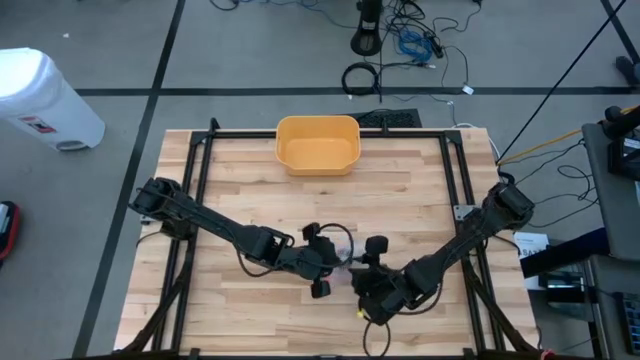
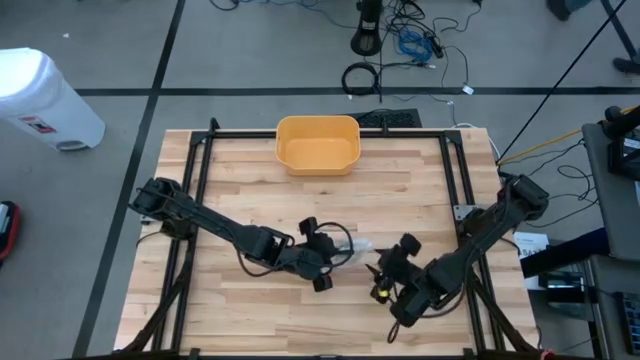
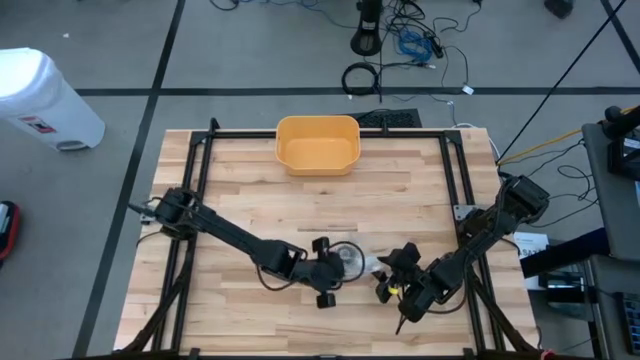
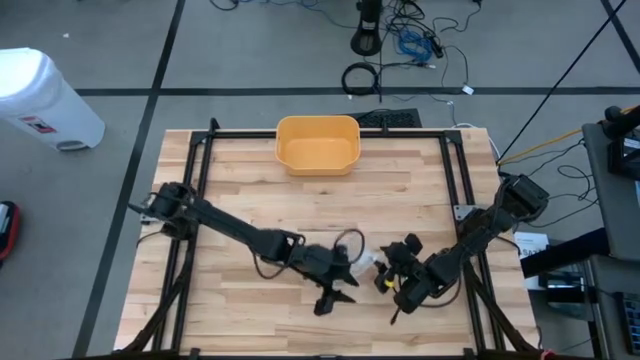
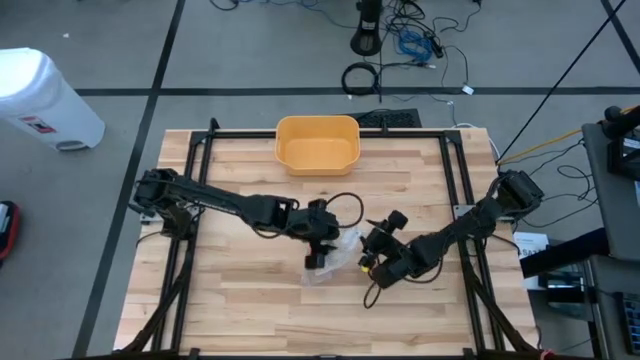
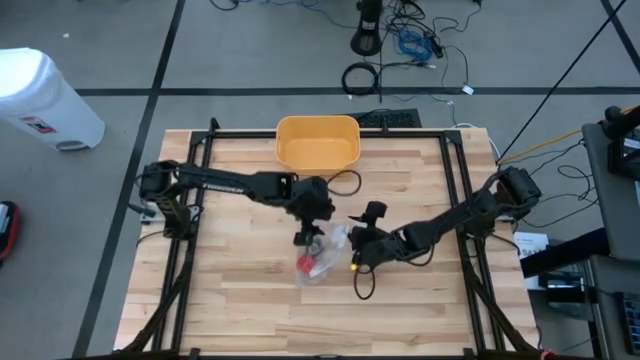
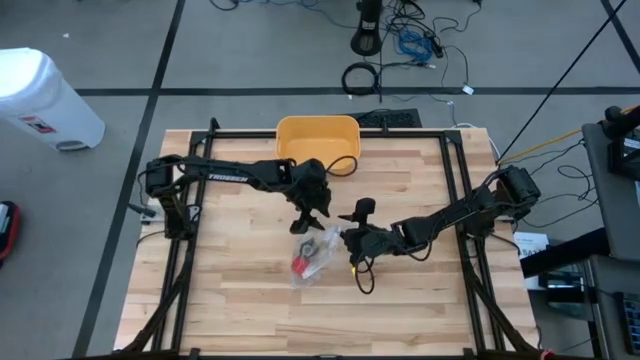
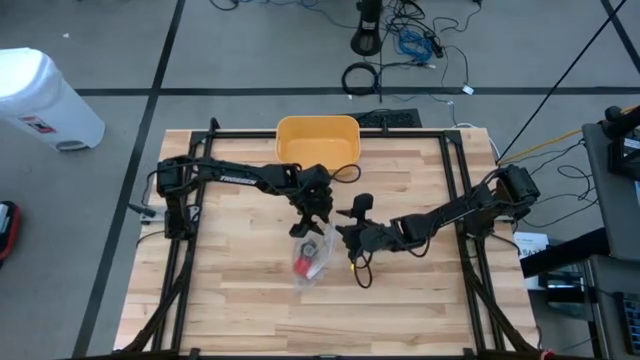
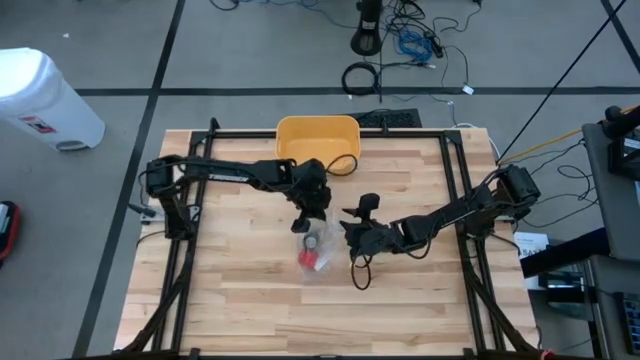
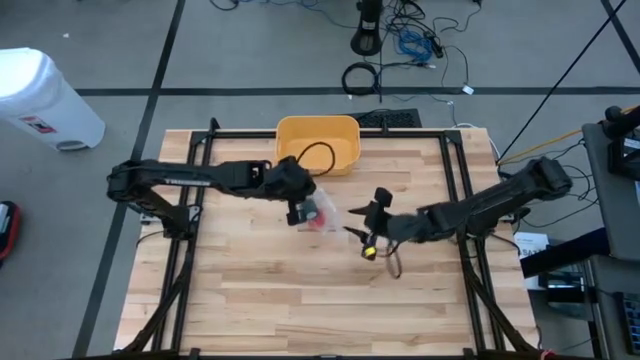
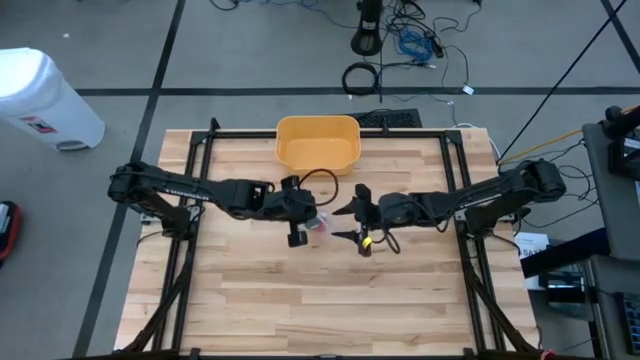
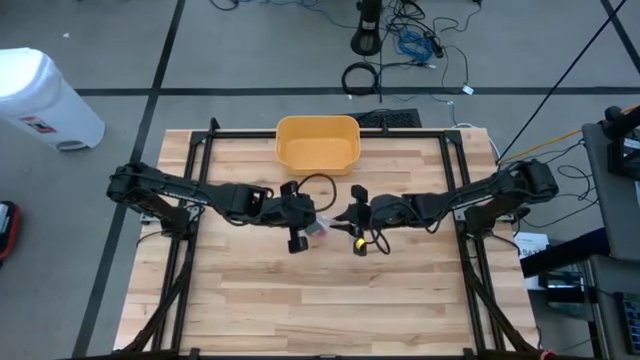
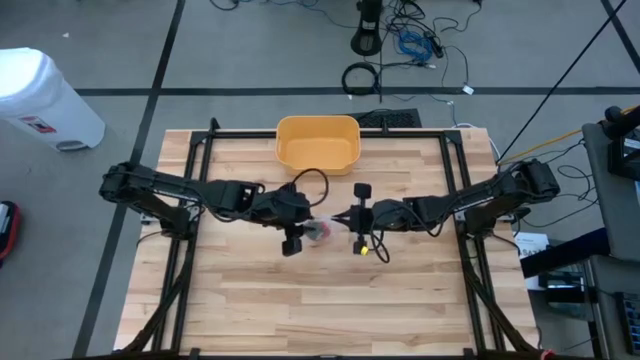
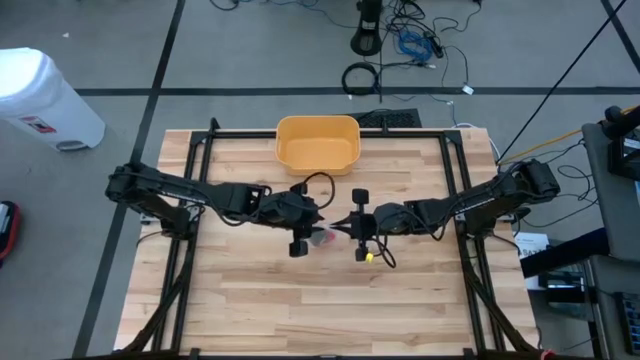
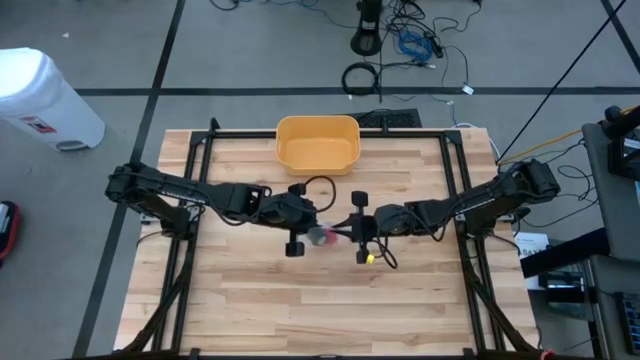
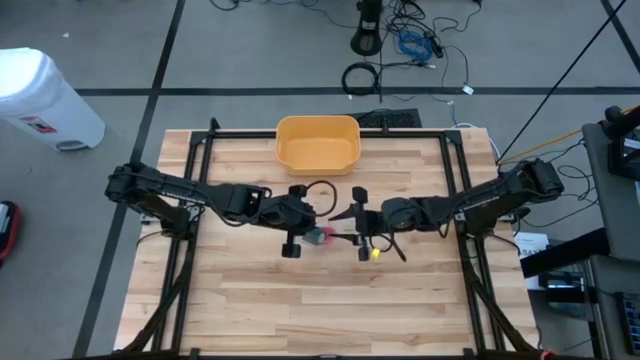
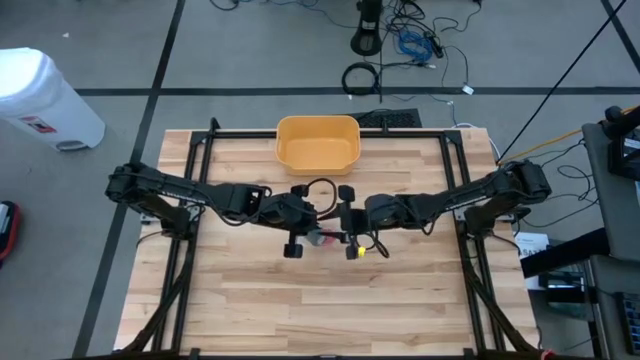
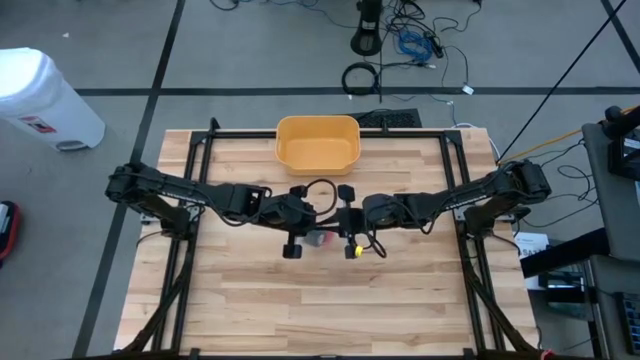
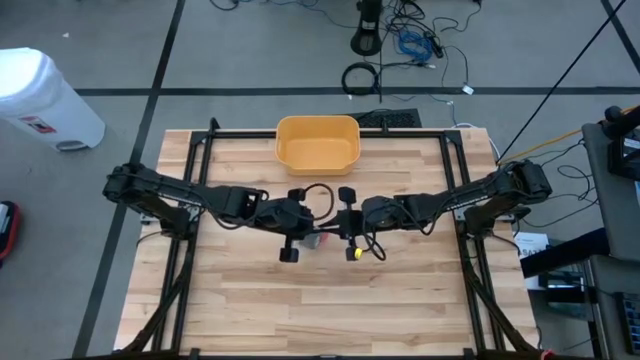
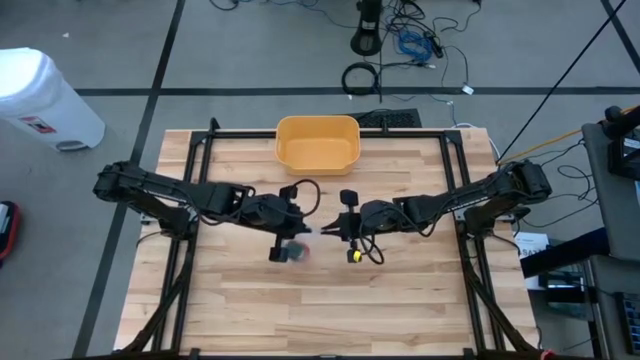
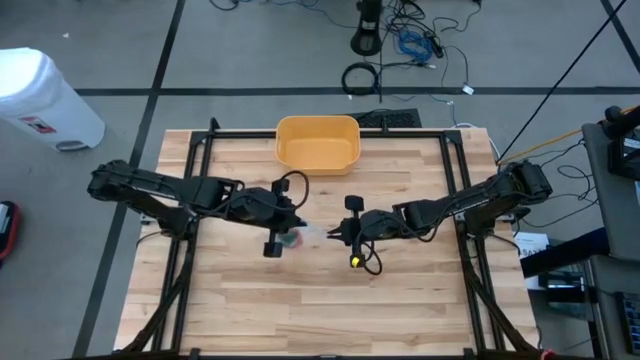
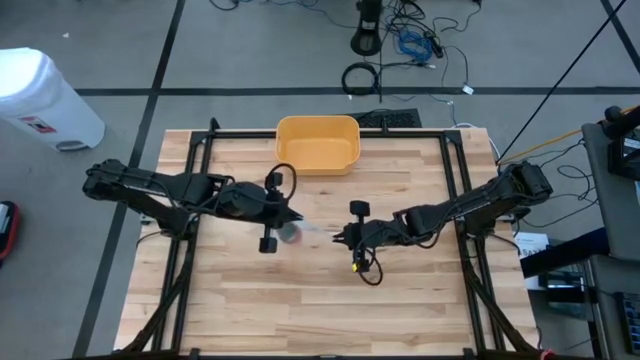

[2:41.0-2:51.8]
Task: Roll bandage
Close the transparent zip bag

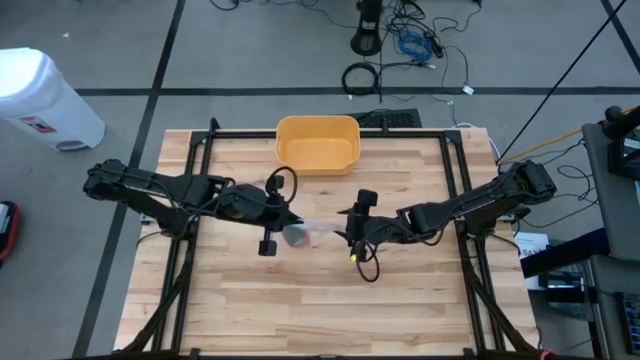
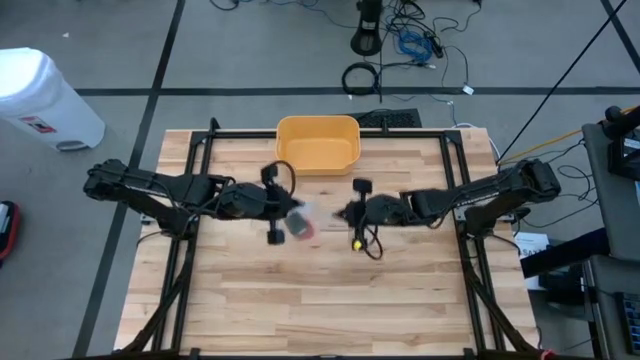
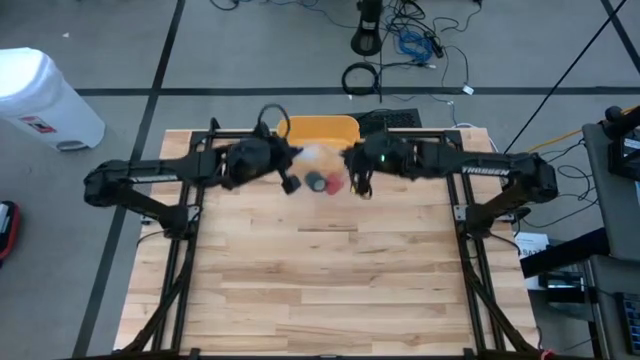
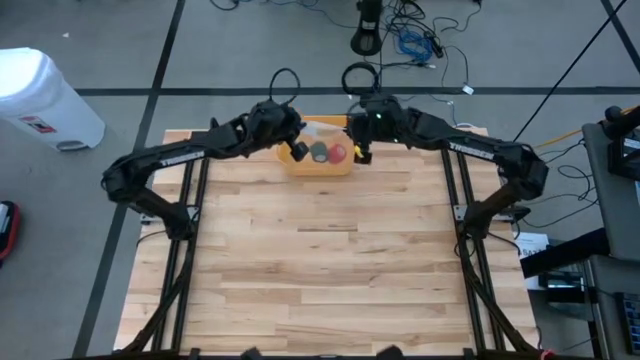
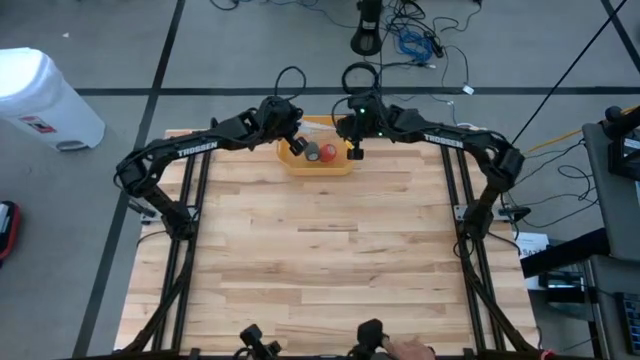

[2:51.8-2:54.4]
Put the packaged red and green rolled bandages into the yellow bin

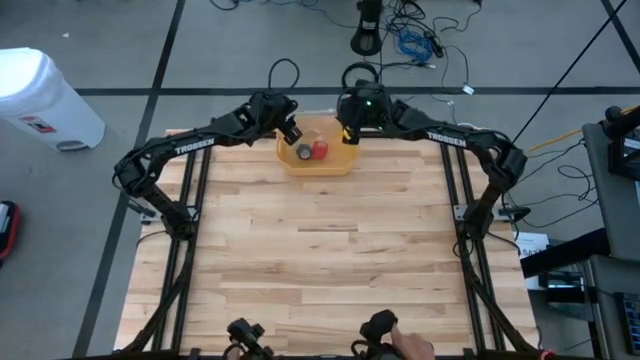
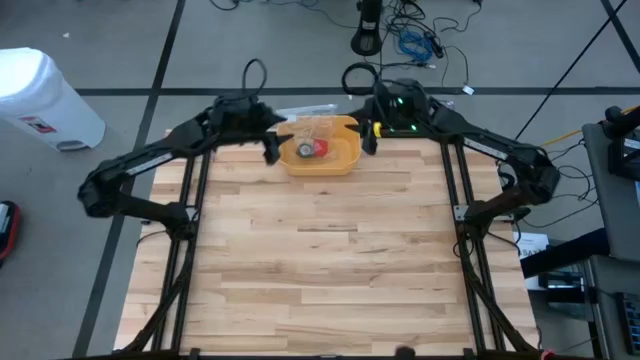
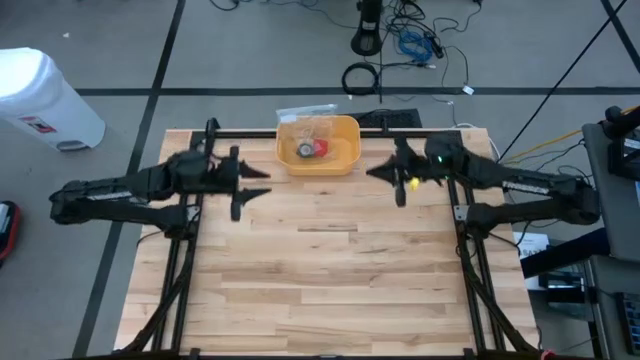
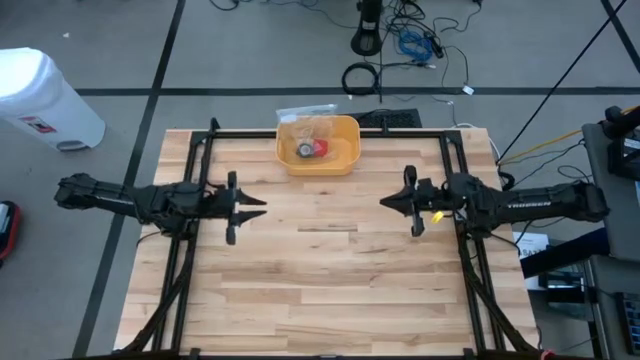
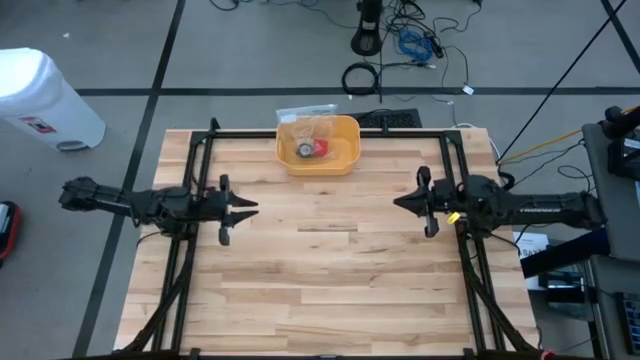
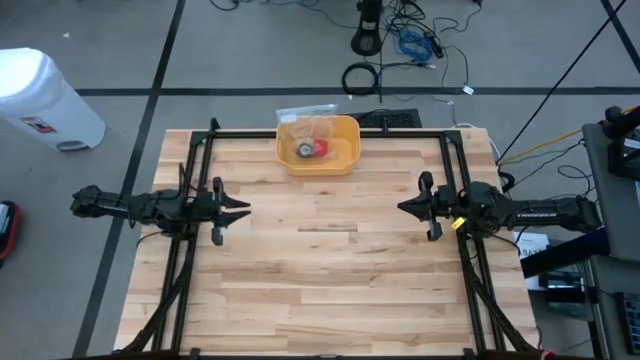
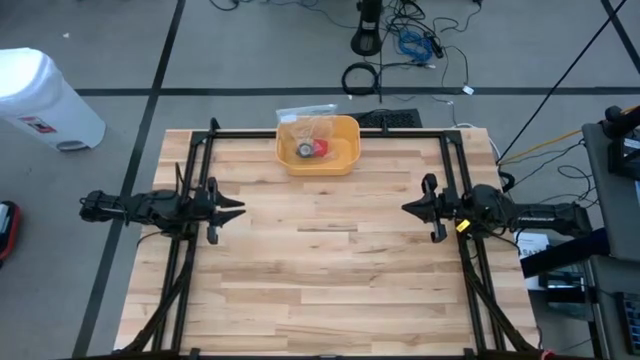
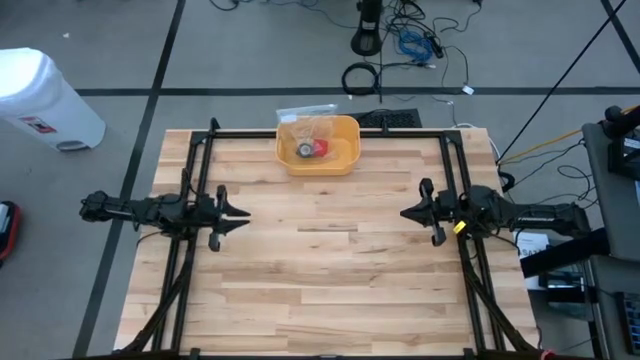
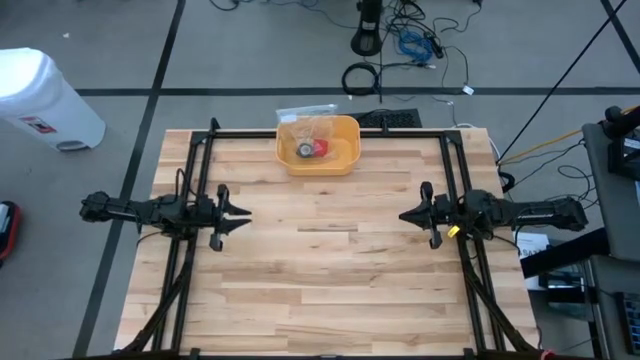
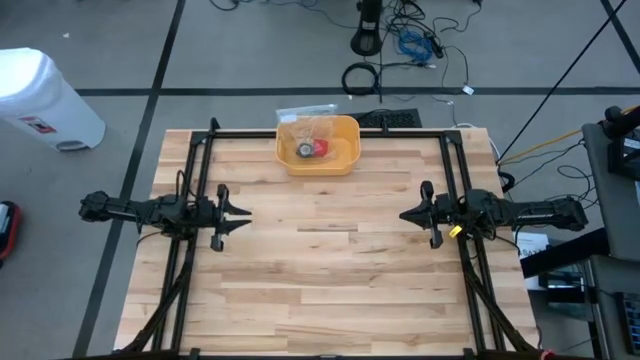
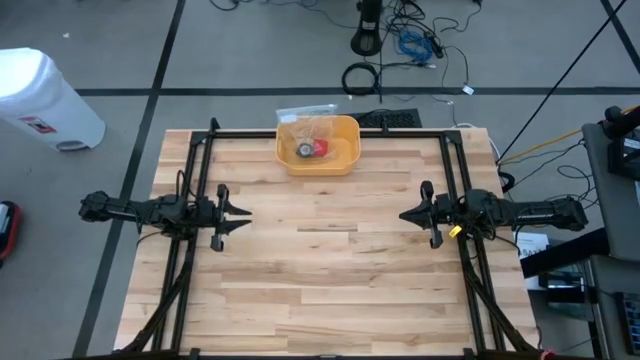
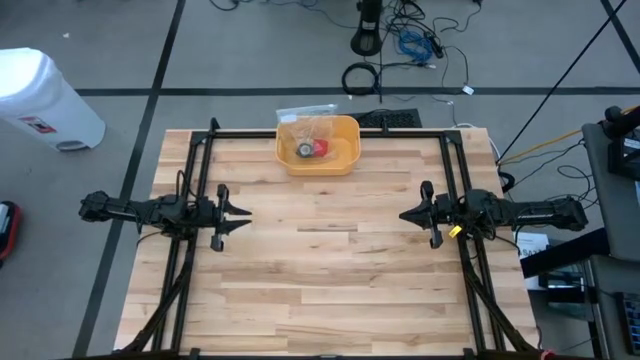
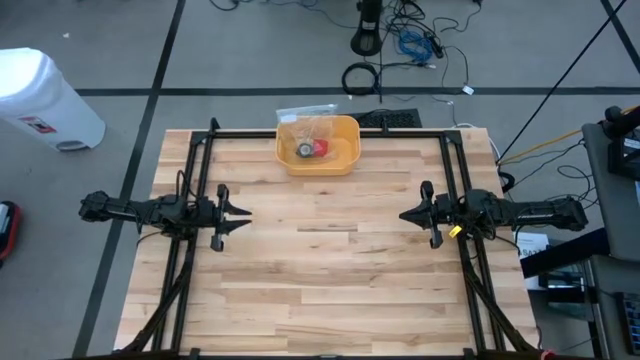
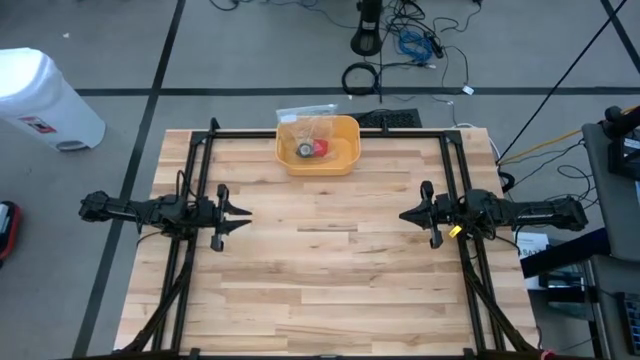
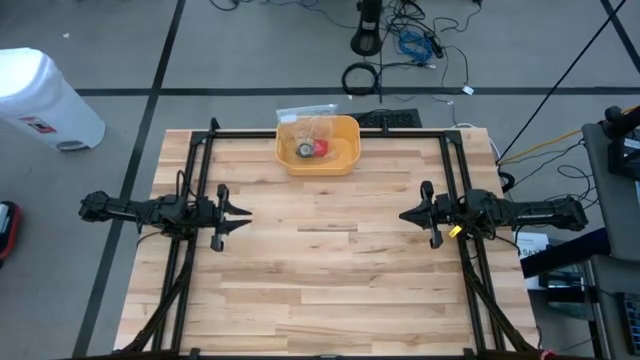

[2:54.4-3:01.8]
Return to Home Position

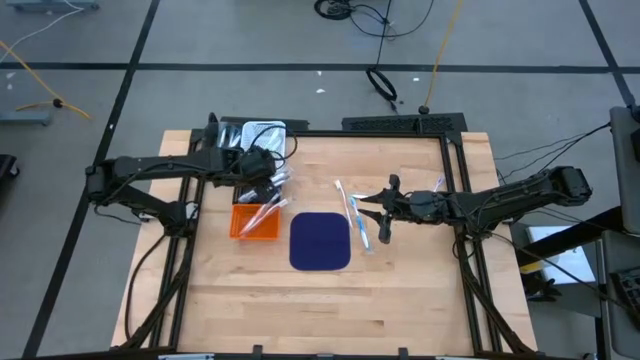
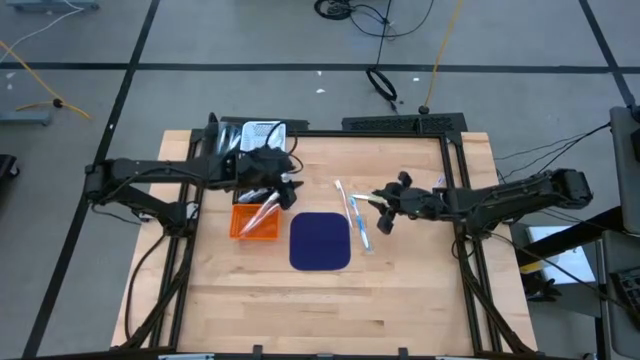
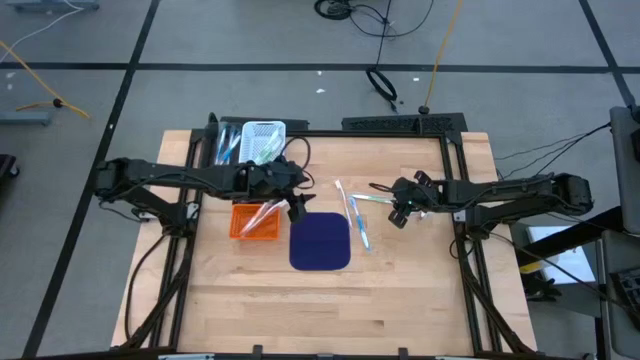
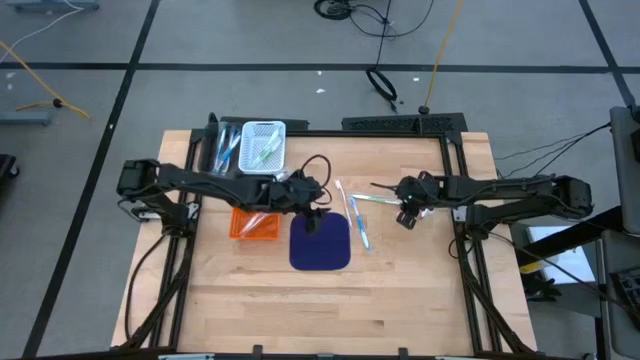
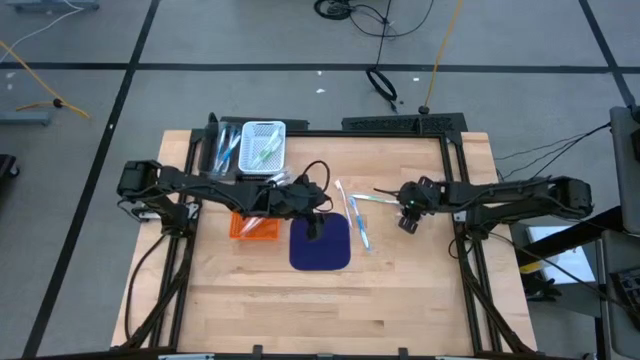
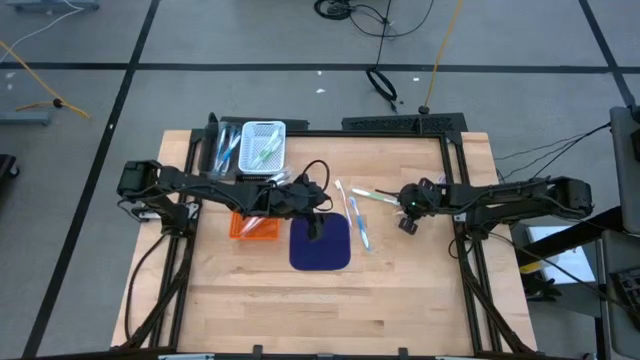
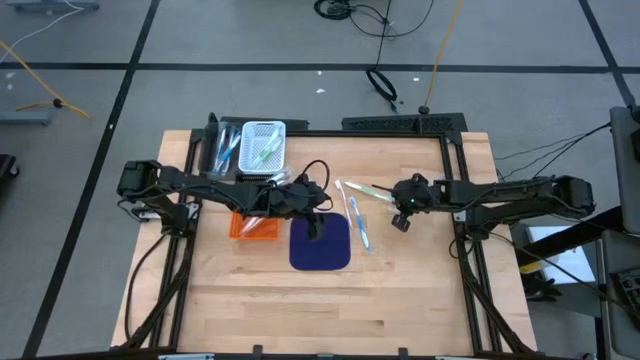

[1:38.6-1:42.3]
Task: Pick & Place Toothbrushes
Put the green toothbrush into the white bin
